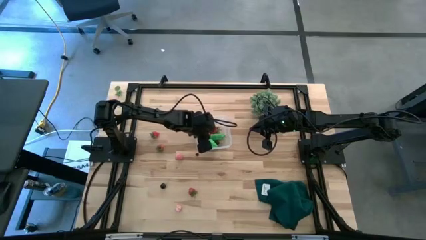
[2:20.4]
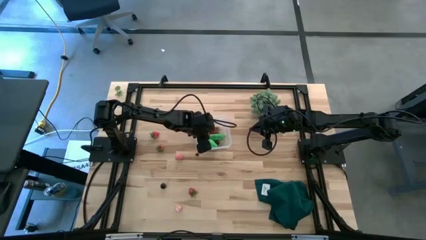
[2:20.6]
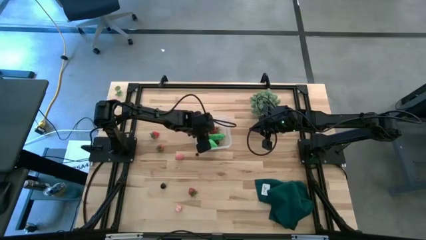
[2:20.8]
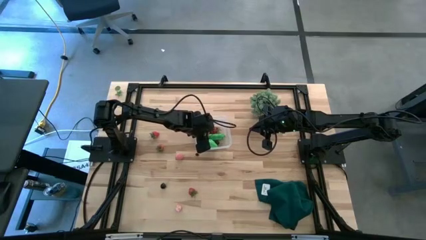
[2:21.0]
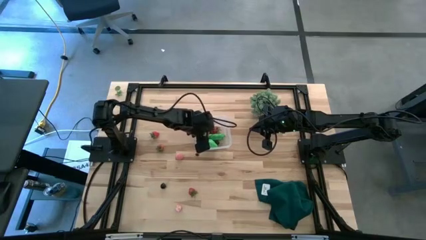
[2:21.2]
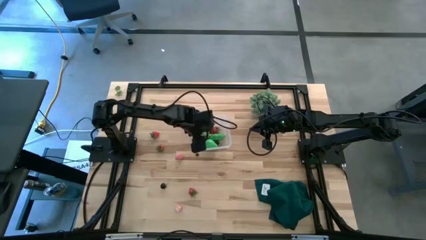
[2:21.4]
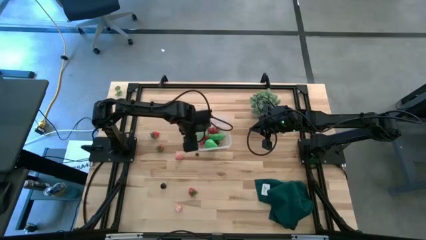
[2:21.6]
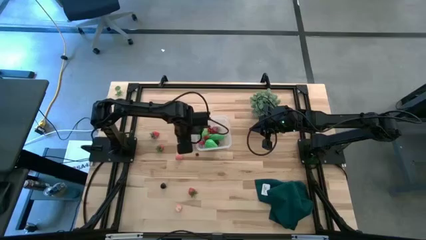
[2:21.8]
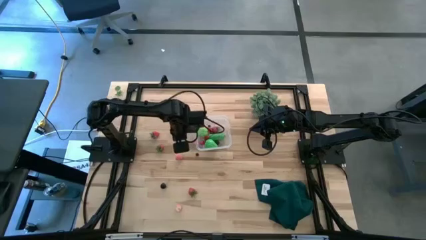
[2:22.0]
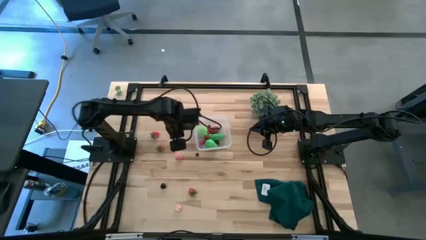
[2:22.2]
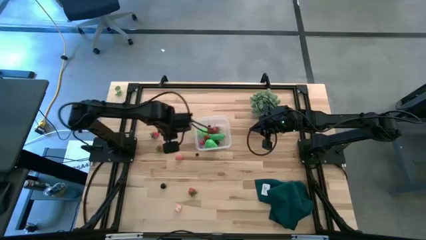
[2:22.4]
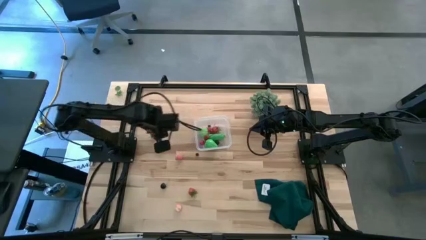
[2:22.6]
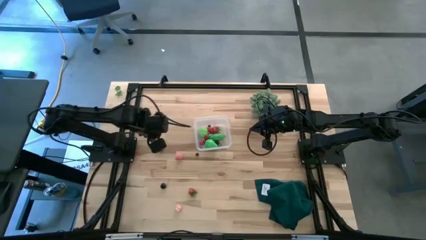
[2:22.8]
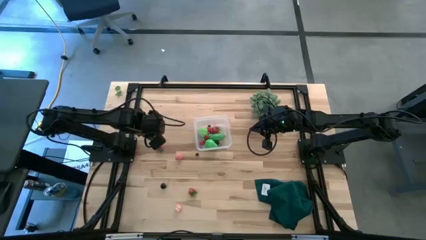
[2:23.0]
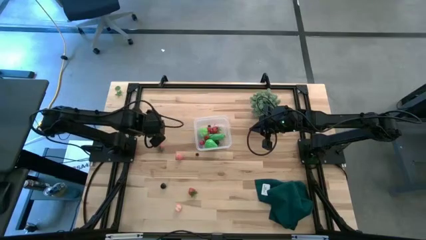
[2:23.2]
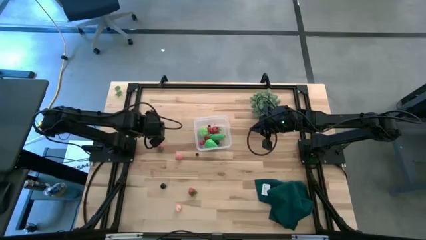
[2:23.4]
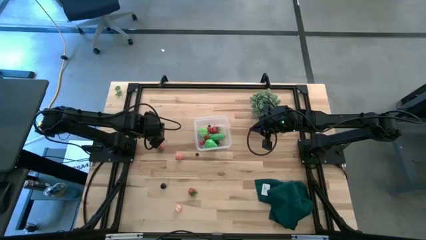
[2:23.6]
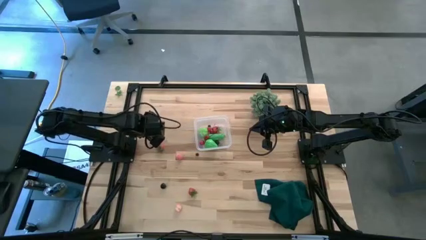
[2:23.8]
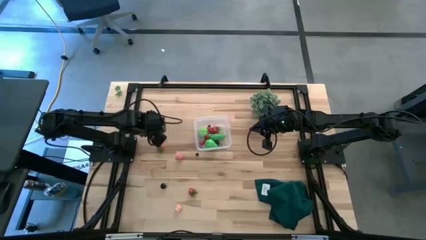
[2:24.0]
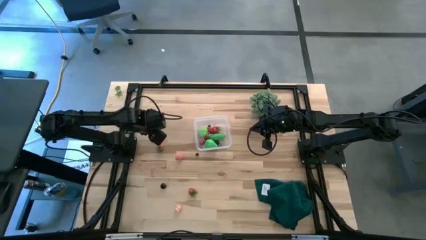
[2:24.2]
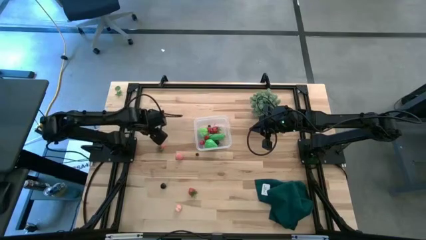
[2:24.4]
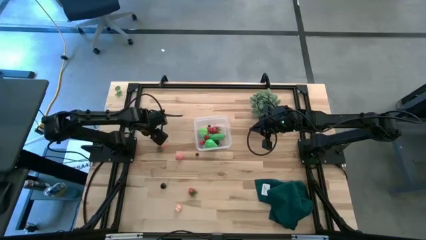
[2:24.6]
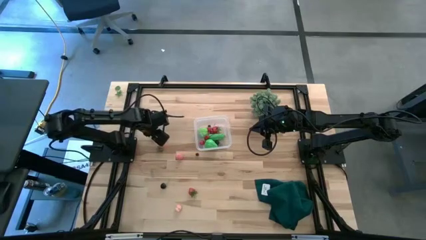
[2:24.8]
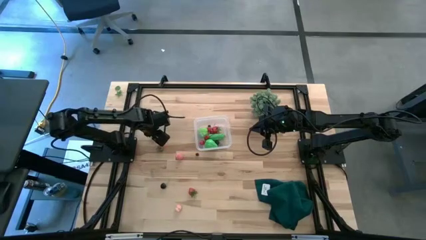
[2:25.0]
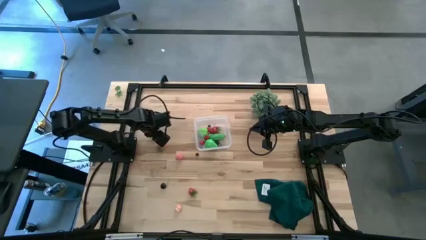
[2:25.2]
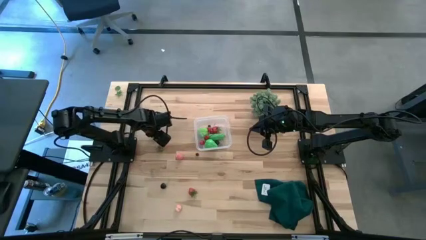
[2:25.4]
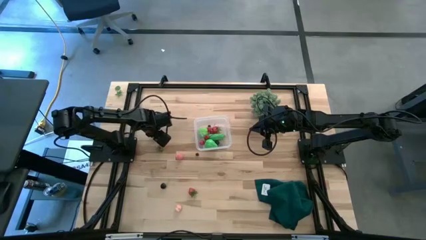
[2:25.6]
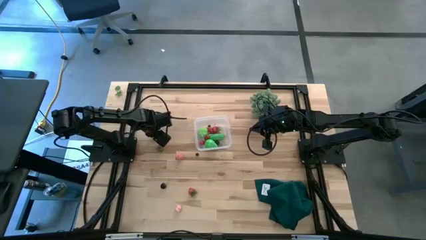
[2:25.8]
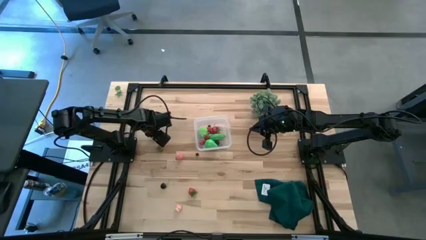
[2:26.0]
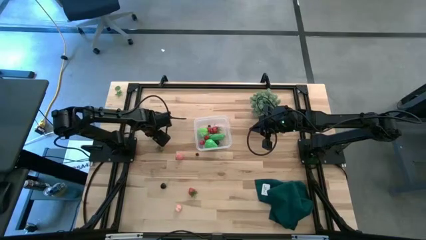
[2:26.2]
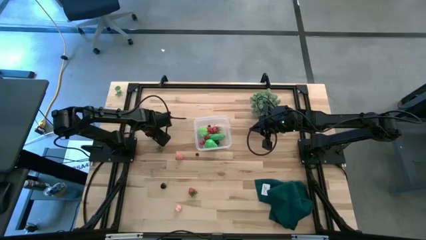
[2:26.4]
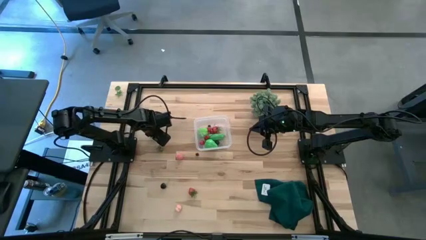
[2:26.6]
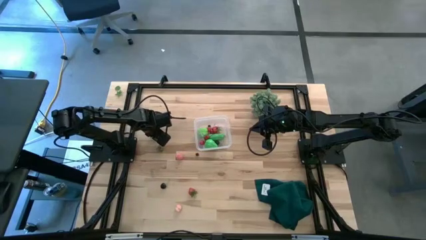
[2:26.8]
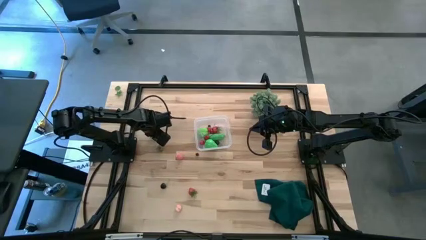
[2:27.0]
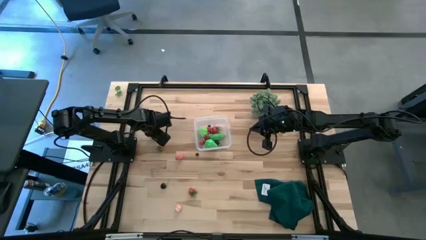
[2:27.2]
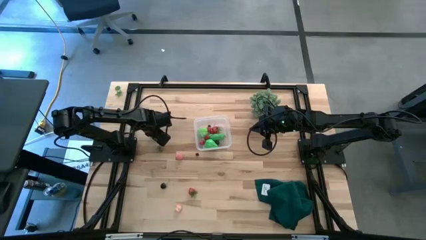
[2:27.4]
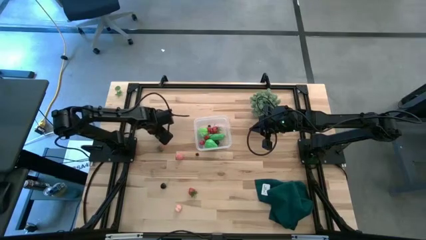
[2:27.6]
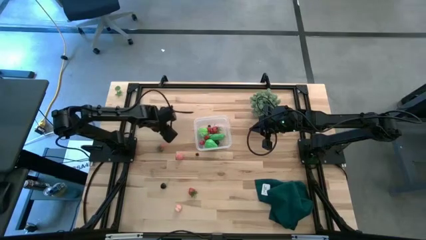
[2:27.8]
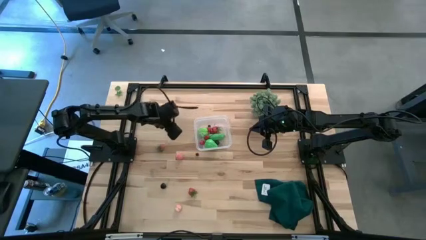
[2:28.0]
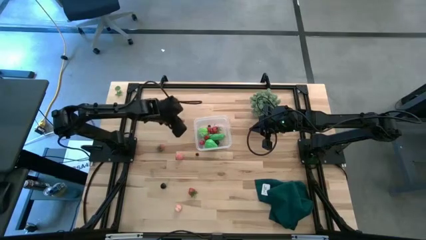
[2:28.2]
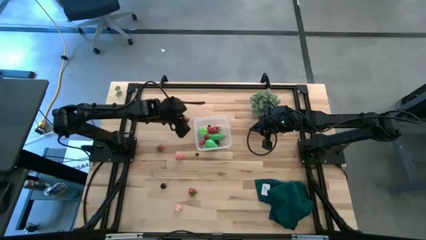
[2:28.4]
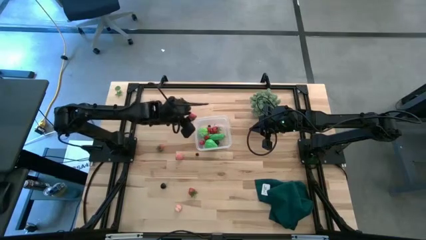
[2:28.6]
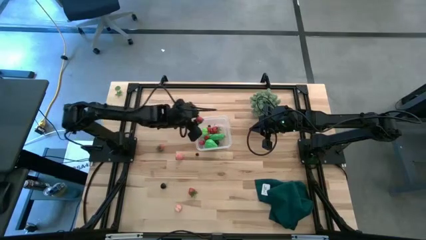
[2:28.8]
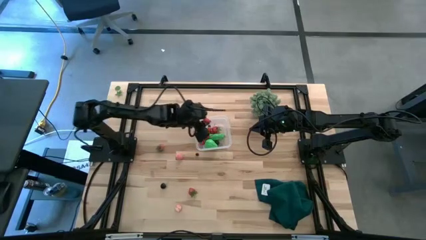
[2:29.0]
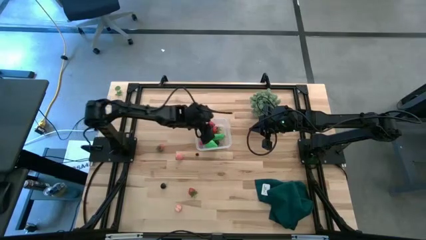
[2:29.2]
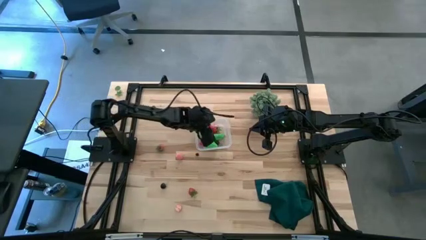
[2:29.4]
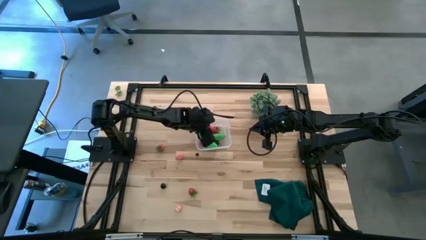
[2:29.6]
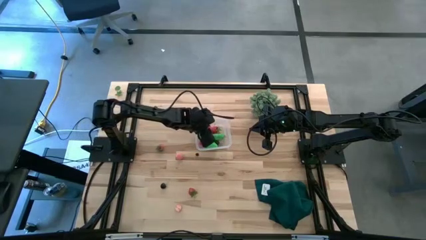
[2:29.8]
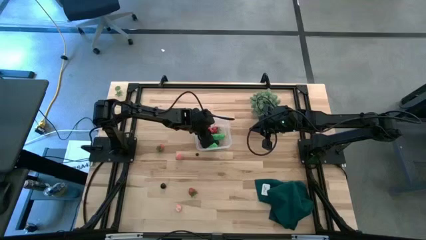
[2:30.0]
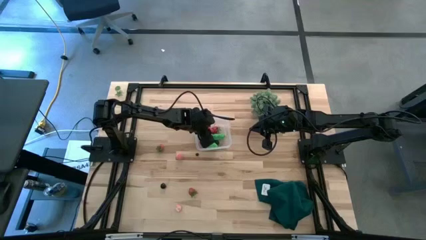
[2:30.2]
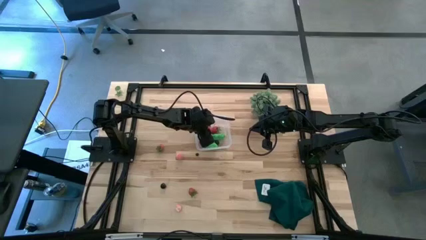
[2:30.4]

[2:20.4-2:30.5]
Task: Pick and placing Produce into tupperware
Put the strawberry into the transparent bin

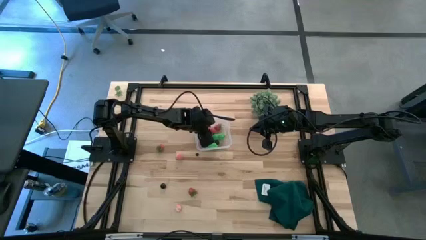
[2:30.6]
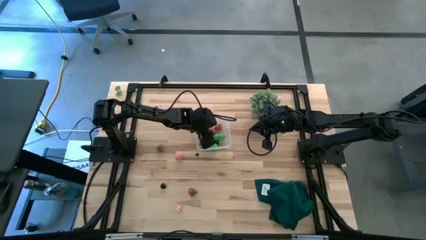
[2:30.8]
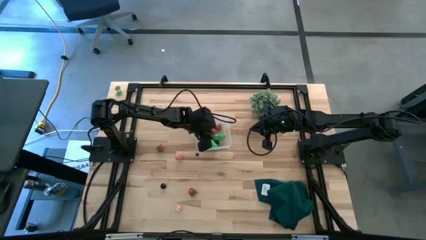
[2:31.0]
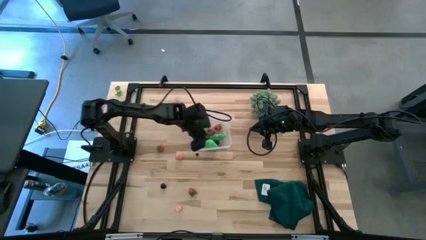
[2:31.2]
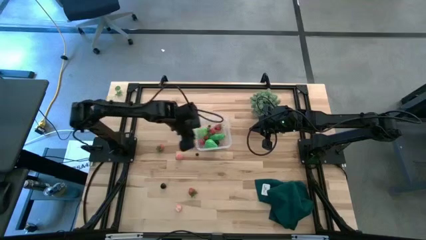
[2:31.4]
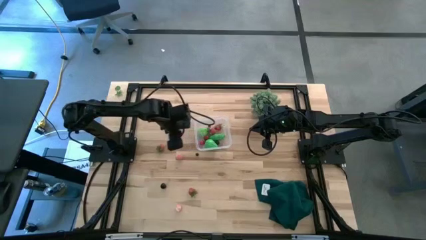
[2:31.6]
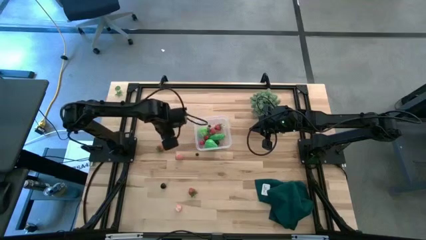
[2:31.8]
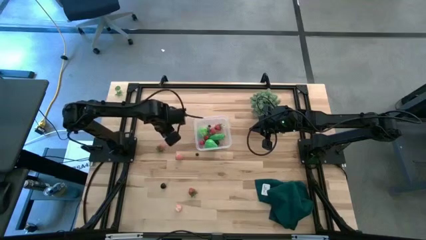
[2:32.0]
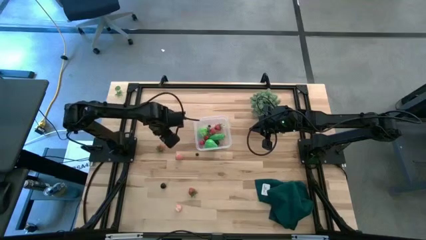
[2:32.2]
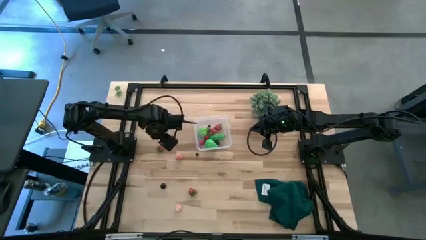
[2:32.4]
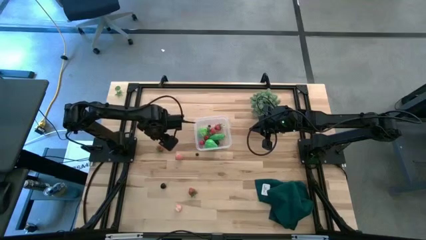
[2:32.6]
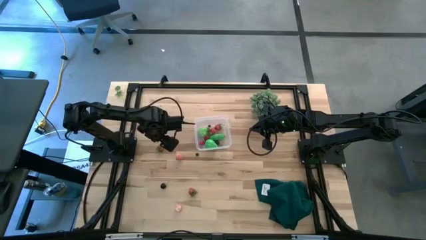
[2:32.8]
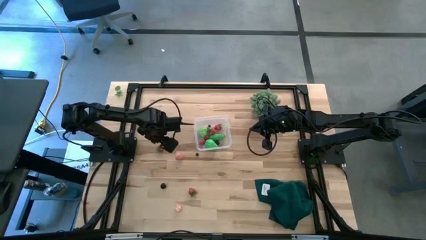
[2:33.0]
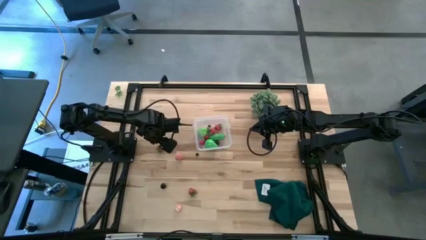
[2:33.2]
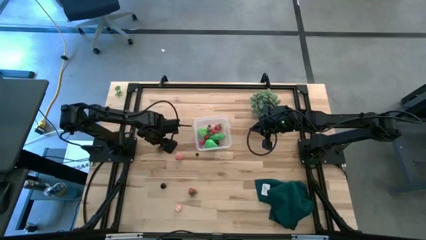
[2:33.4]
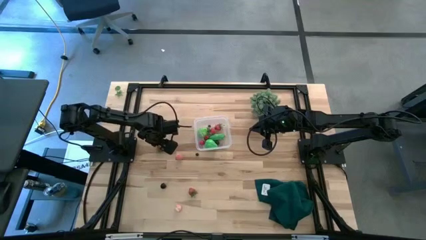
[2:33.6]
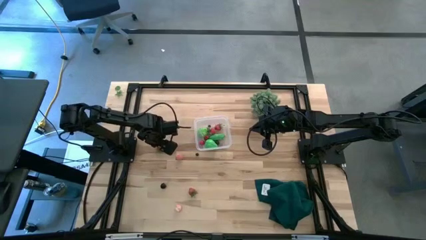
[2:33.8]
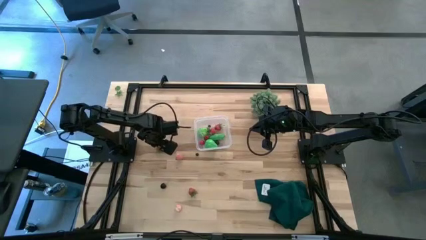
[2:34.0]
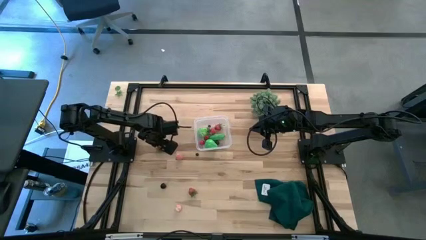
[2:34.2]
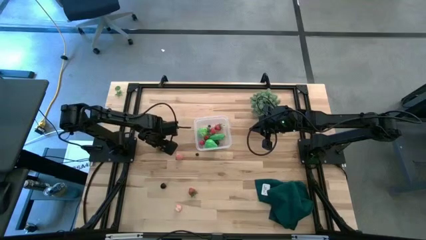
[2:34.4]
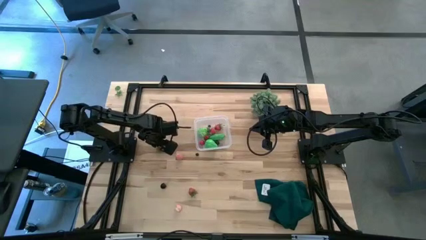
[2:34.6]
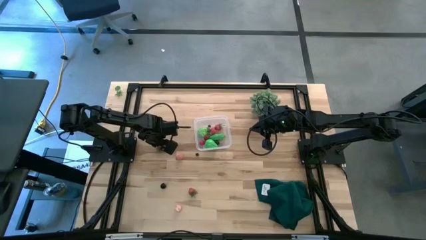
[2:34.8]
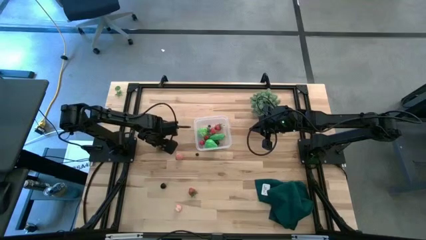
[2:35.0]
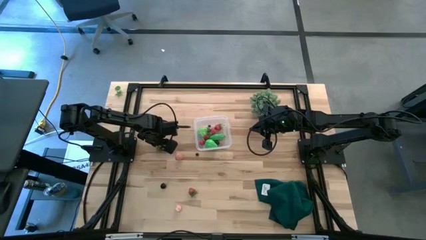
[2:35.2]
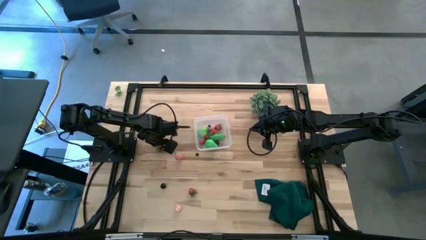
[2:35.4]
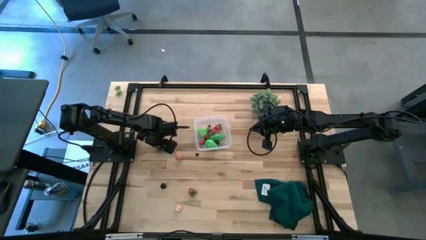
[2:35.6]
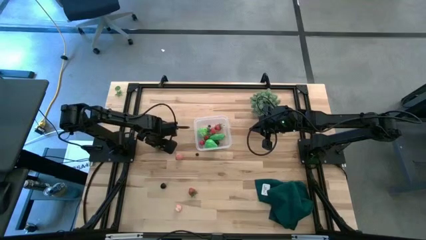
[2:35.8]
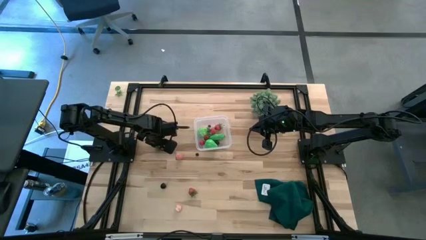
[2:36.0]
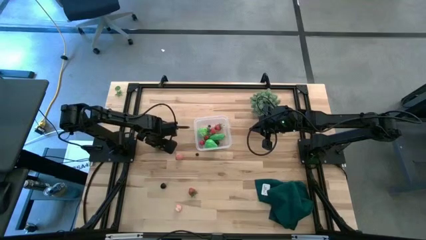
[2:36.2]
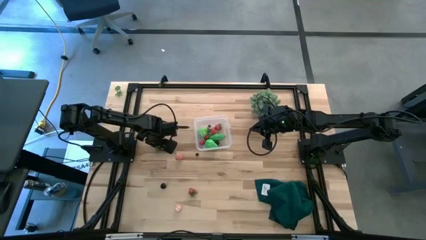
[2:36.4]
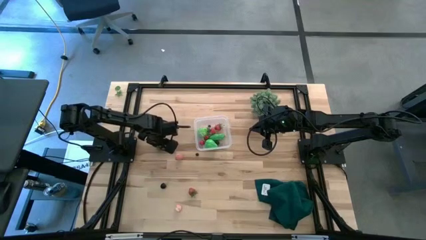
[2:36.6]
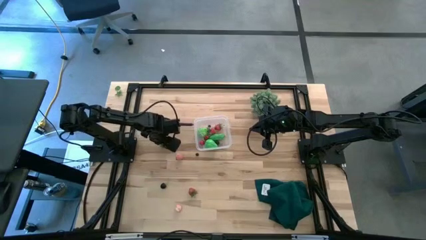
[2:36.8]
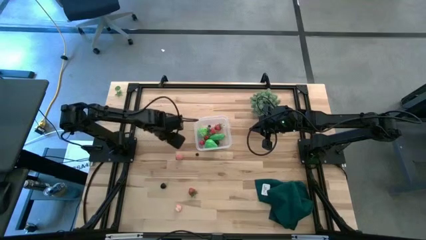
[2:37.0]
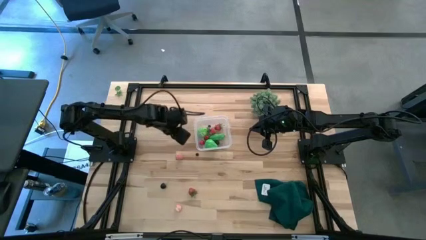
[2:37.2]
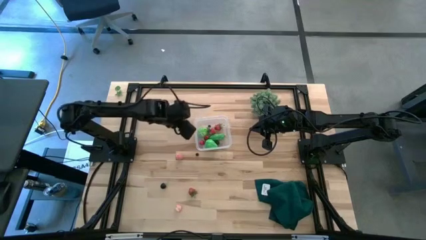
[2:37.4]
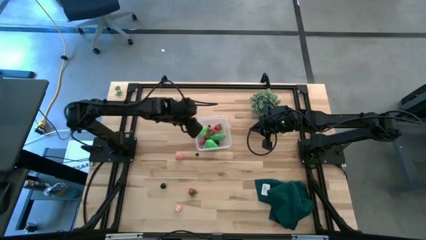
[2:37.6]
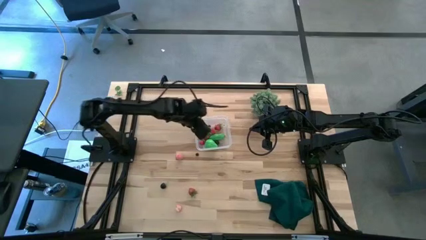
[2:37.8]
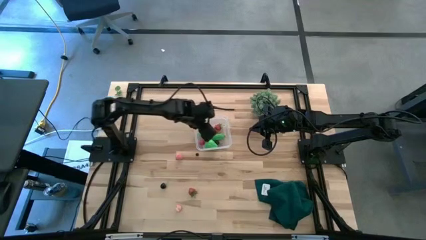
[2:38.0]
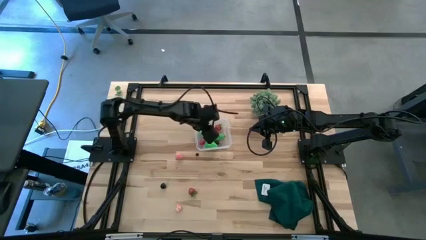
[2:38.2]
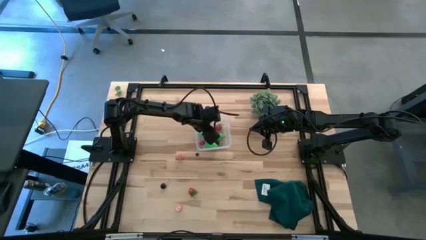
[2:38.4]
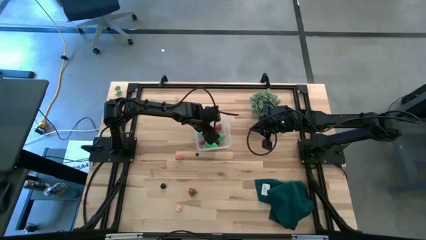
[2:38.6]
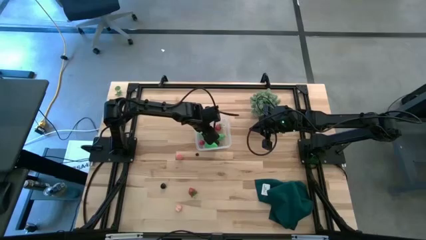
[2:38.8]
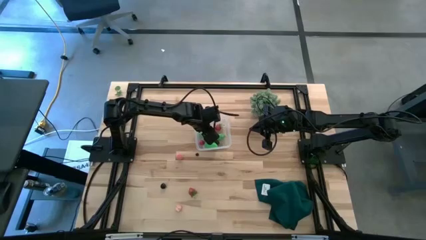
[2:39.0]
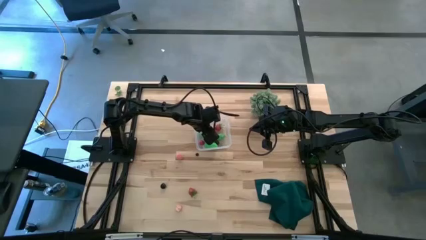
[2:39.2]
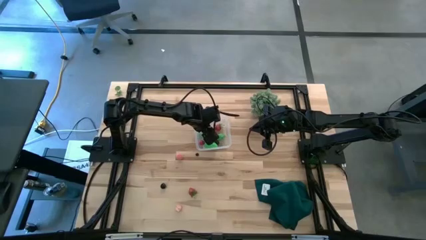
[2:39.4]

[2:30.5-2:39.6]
Put the strawberry into the transparent bin
